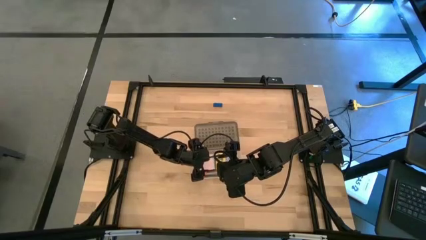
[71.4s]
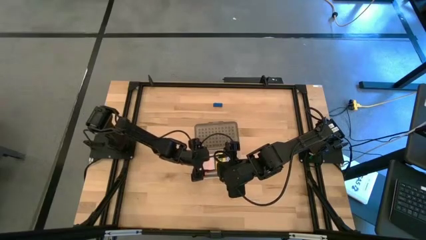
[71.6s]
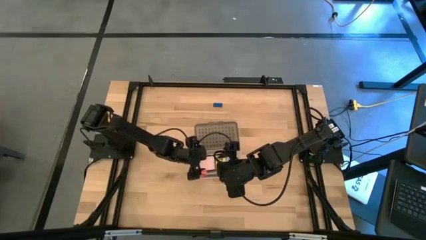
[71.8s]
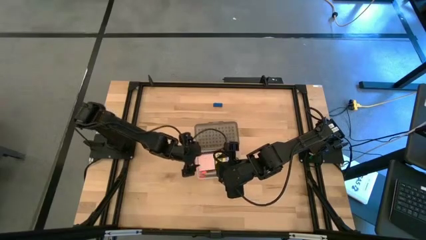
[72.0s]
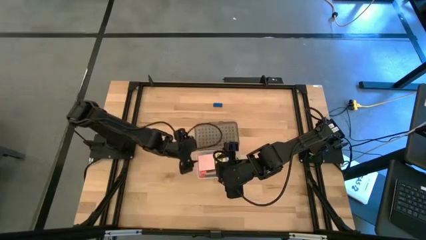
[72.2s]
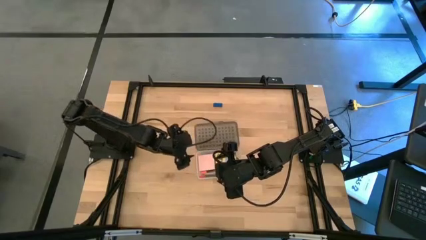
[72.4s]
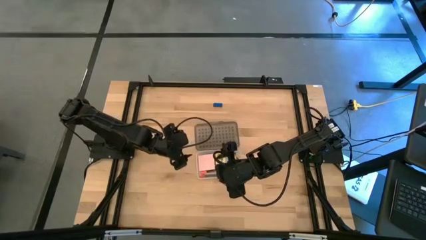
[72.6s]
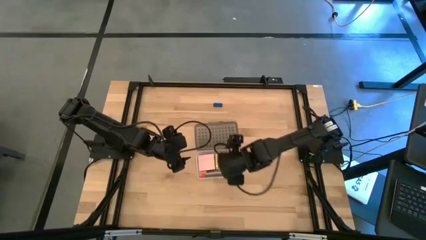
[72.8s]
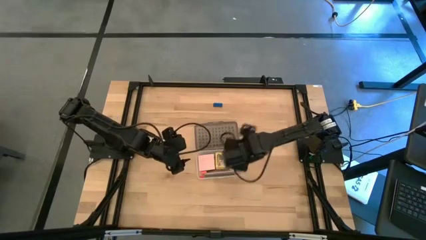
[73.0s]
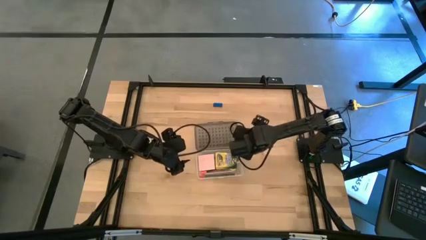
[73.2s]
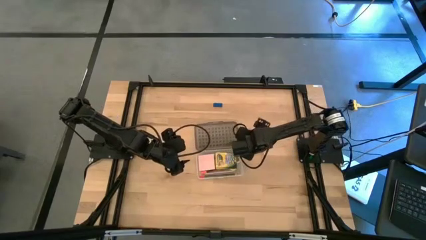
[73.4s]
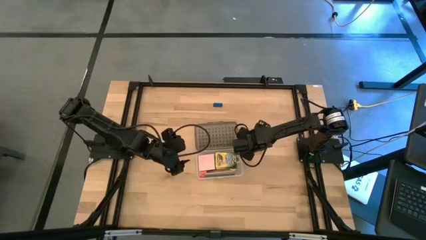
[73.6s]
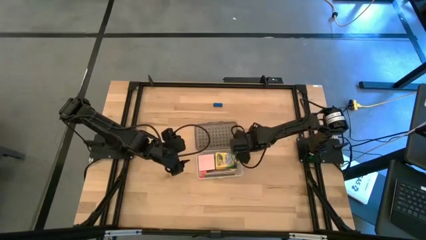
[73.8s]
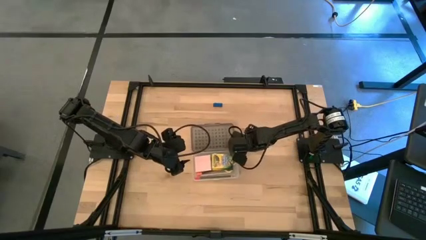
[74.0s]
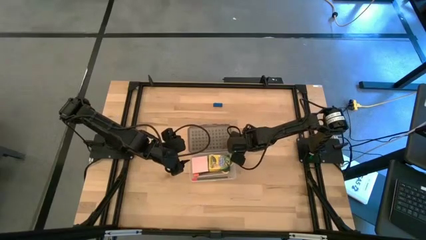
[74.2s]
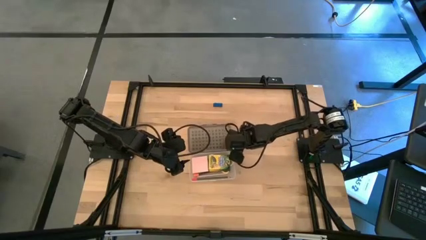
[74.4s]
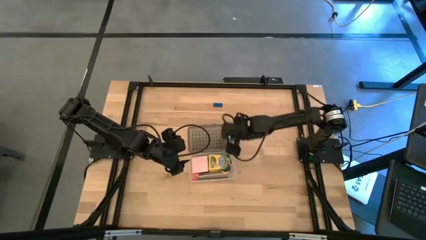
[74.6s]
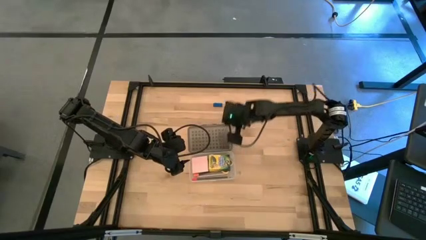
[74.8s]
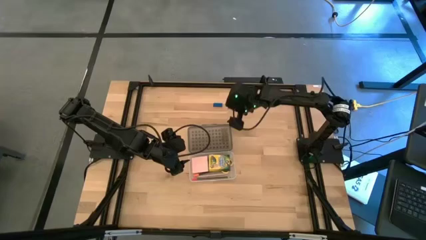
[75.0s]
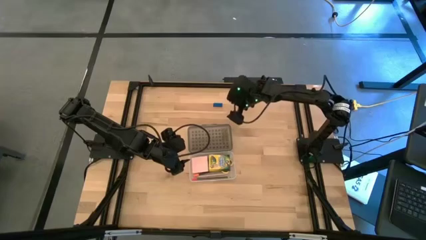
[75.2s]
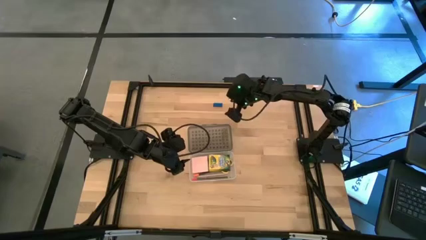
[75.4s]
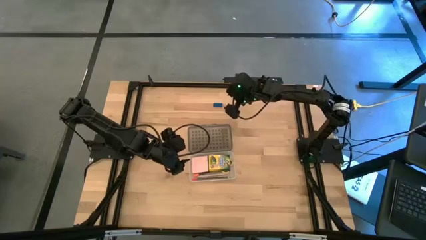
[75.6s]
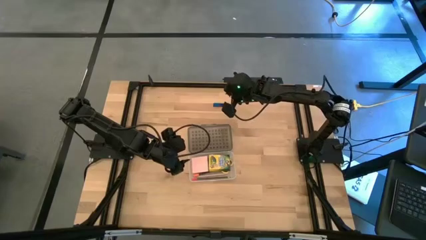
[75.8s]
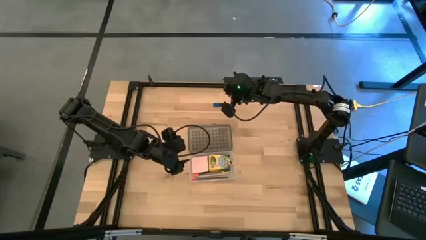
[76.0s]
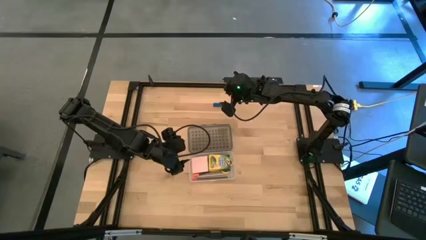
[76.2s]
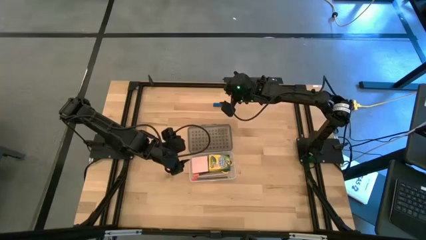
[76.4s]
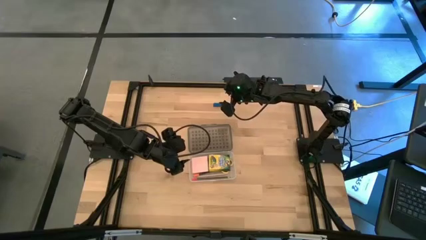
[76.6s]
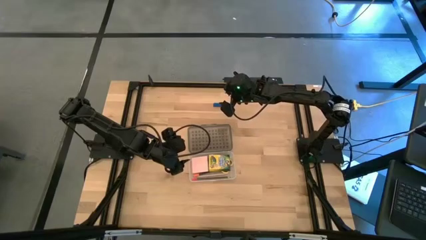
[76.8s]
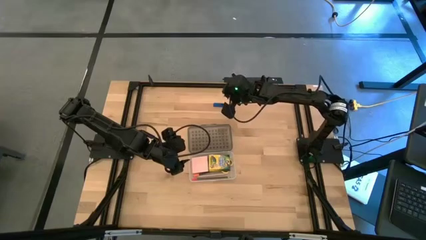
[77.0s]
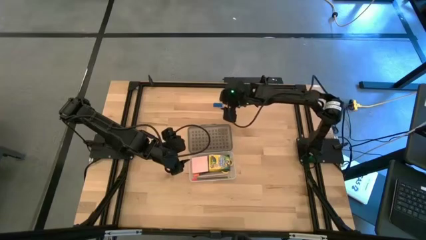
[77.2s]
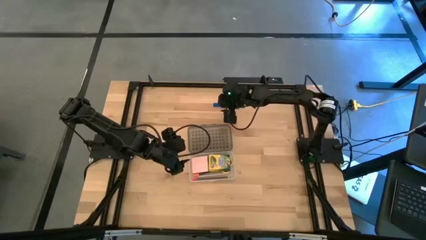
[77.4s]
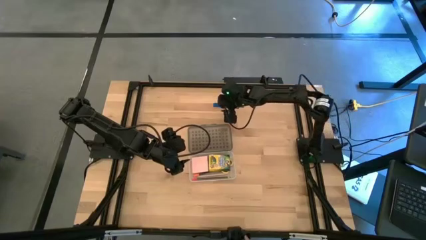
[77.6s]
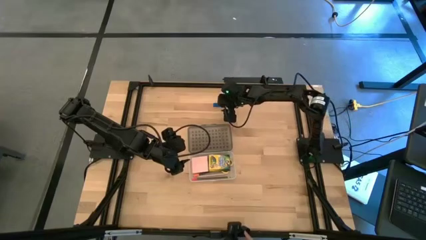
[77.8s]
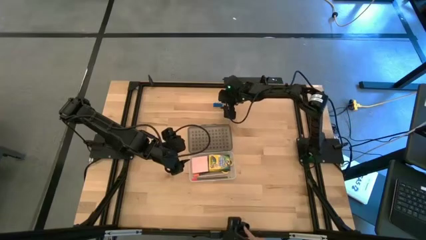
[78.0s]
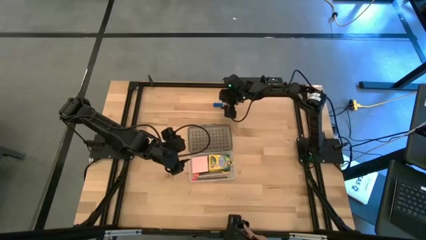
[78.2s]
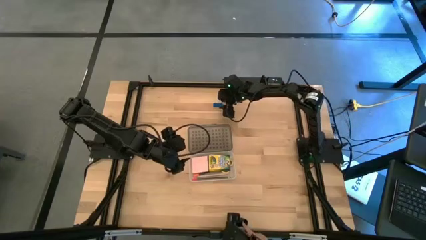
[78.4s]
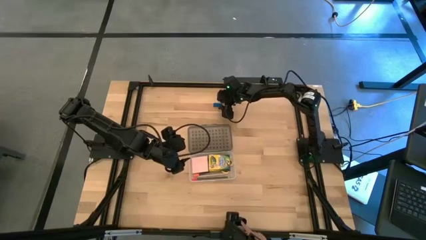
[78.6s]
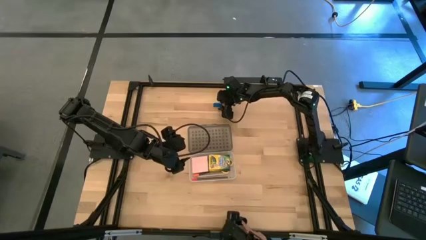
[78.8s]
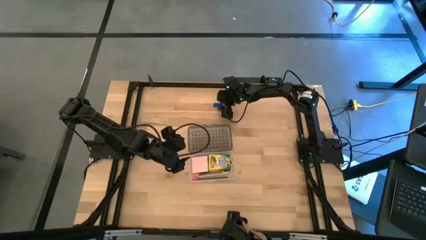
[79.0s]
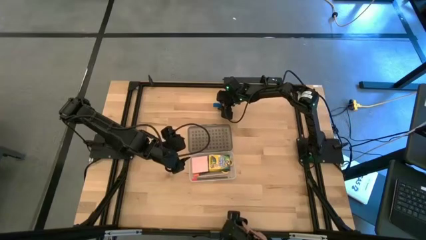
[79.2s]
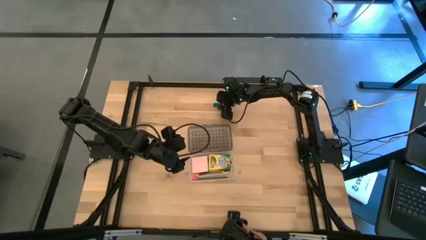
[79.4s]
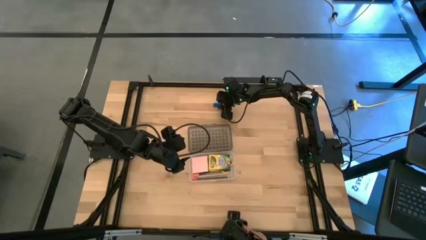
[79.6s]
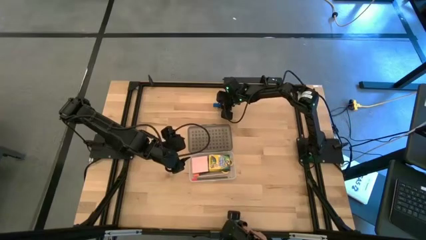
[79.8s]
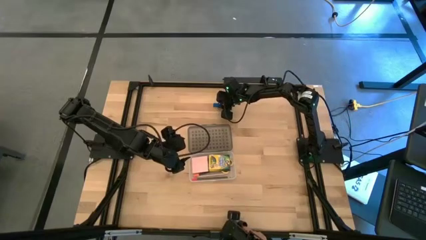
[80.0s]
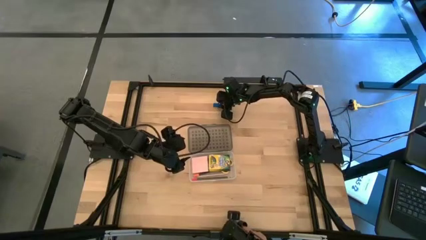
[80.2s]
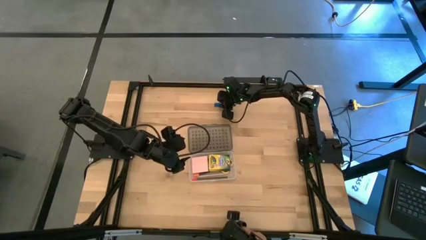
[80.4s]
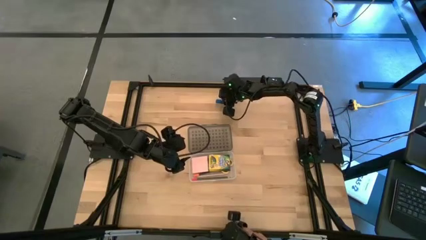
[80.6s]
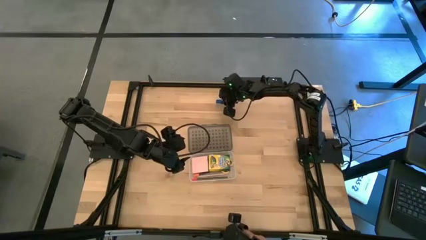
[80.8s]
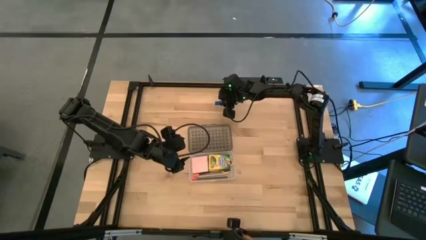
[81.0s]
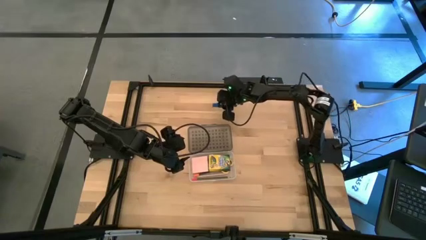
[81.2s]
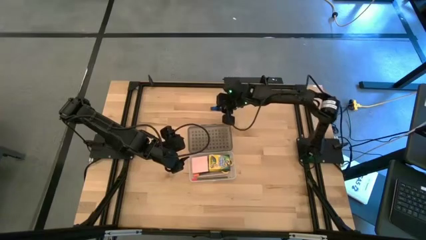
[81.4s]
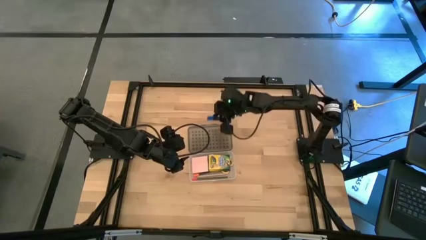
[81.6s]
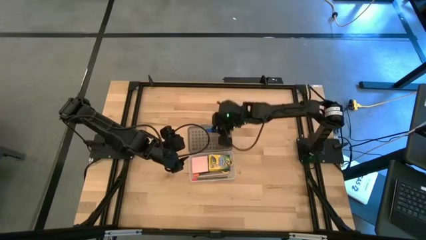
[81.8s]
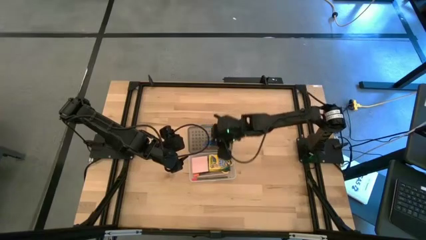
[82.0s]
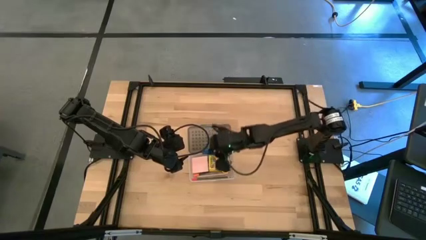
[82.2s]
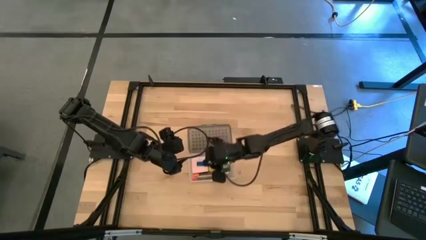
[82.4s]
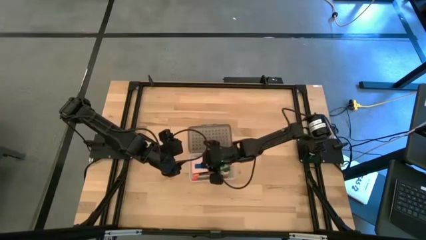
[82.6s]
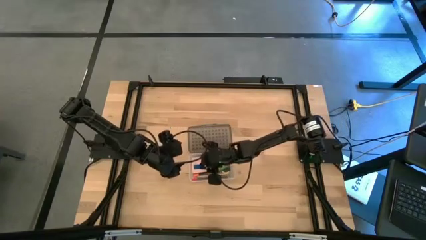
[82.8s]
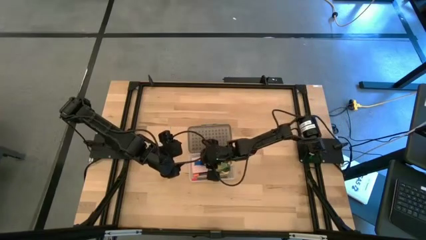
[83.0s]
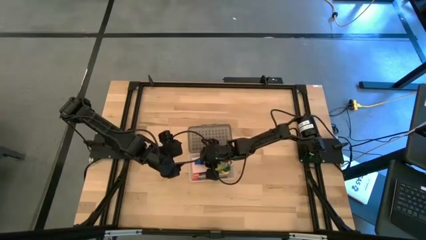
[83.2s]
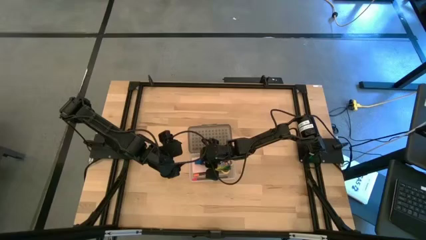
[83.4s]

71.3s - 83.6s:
Task: Pack school essentials
Put the blue eraser into the black supply box

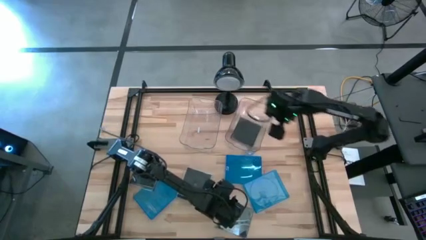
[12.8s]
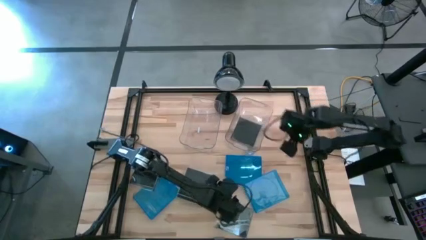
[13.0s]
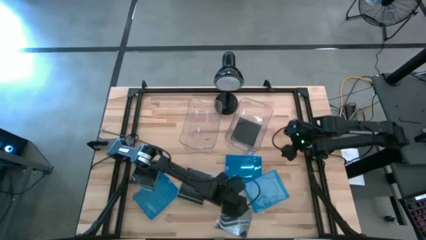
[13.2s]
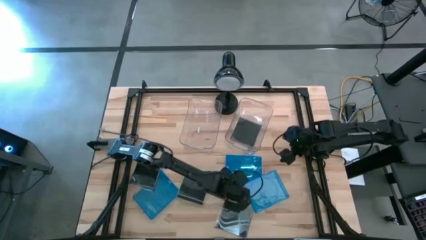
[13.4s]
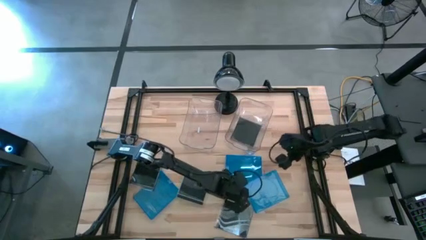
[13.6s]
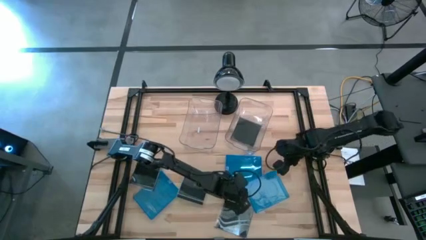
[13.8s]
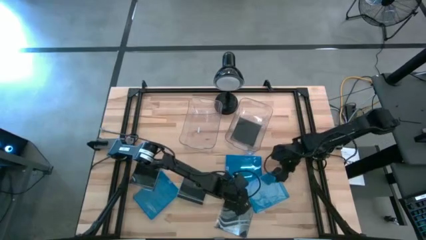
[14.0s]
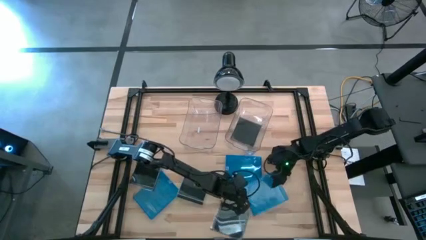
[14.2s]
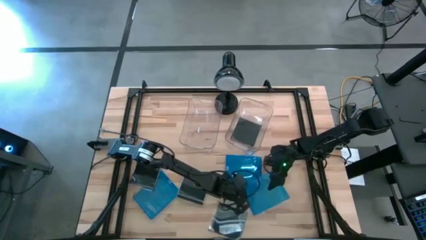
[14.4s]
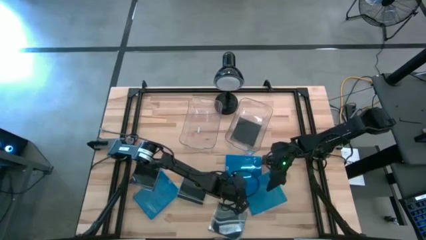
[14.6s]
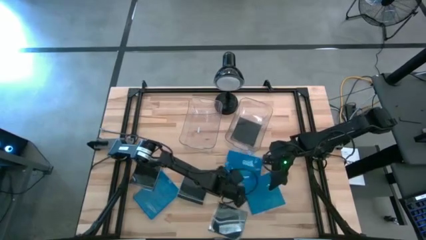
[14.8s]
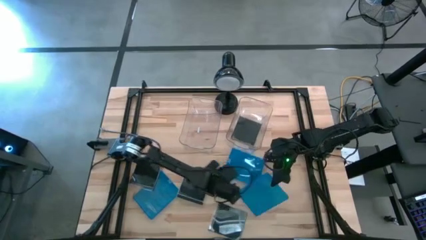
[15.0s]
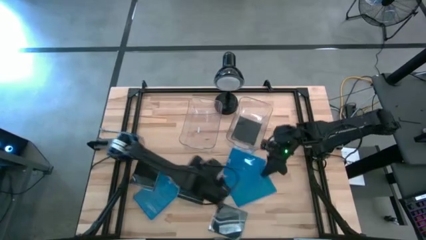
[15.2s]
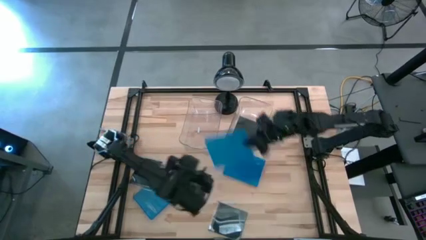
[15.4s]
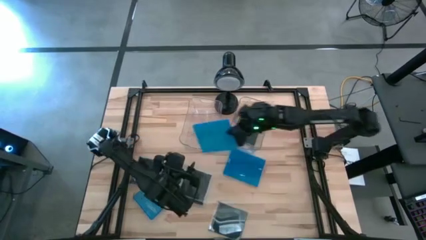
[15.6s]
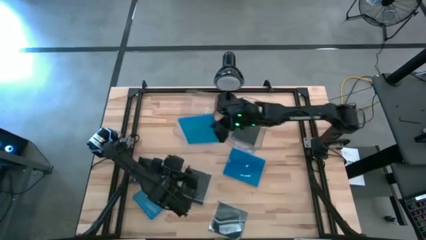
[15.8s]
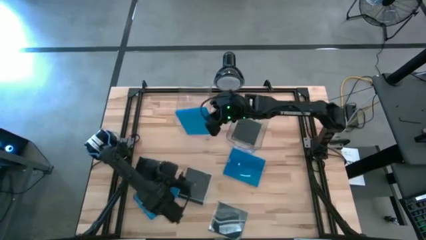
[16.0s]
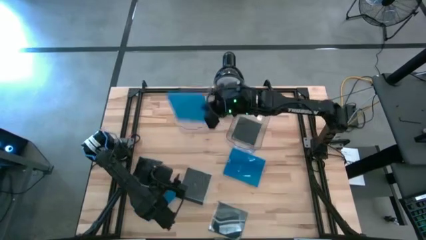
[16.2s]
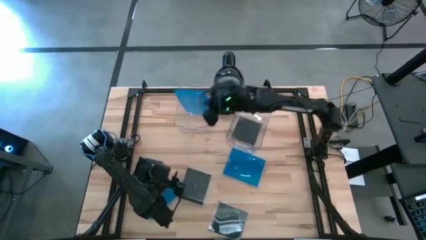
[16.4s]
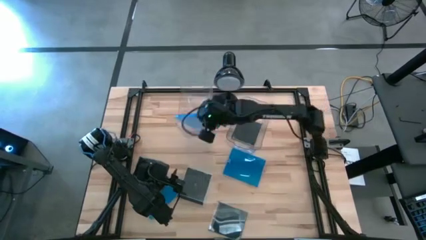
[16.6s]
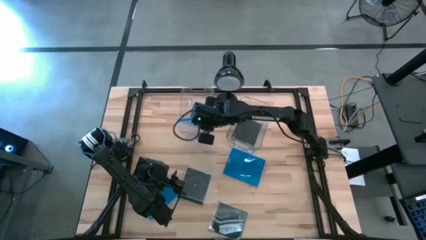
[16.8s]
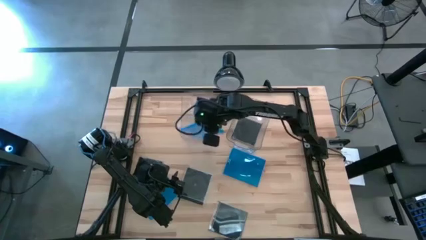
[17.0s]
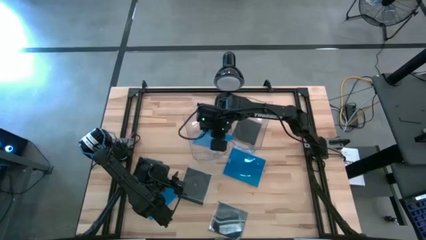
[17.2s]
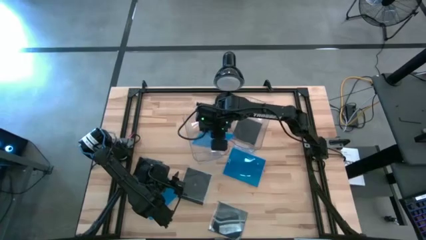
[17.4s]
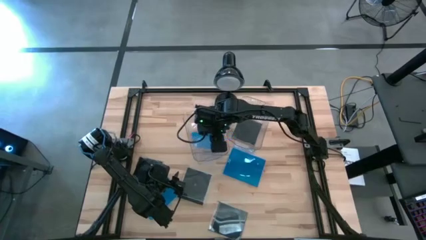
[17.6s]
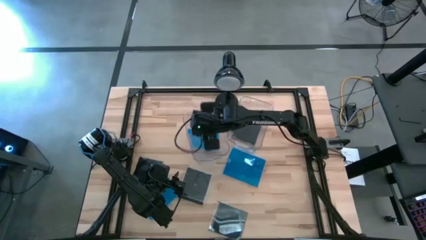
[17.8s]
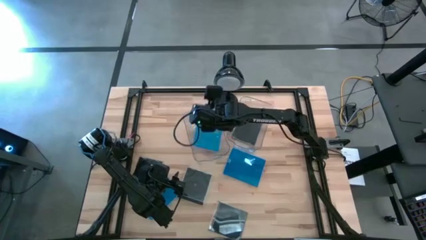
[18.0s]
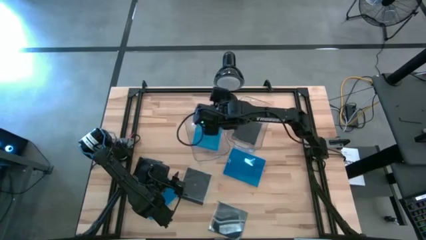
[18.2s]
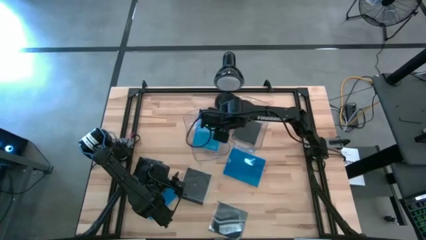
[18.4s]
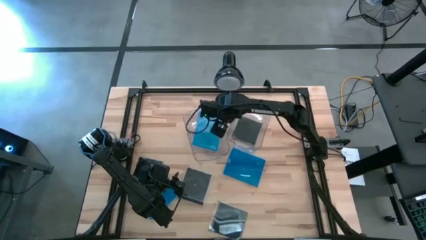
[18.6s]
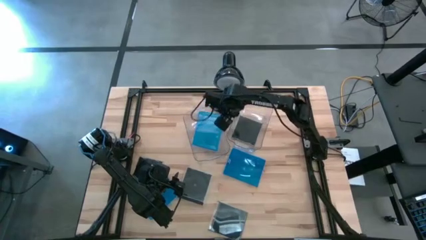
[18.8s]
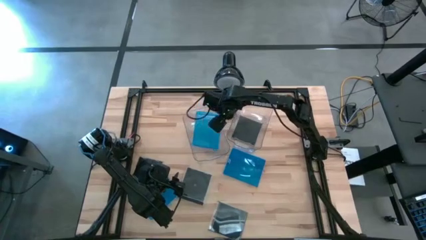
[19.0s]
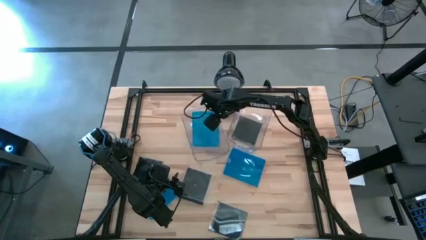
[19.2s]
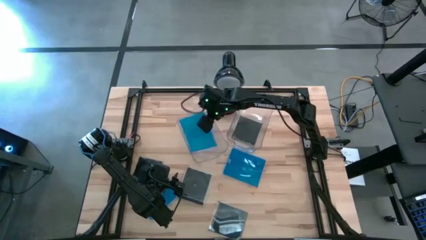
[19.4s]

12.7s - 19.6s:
Task: Pick & place jewel cases by type
Put the blue CD case into the left transparent bin
